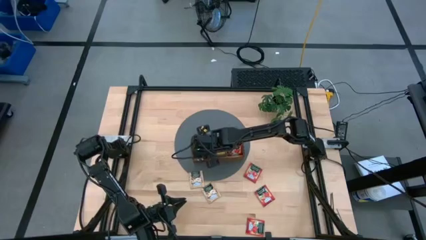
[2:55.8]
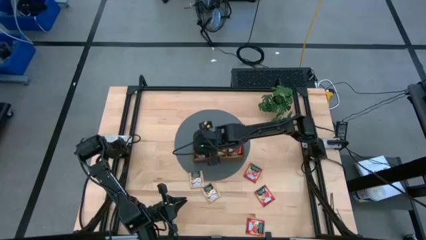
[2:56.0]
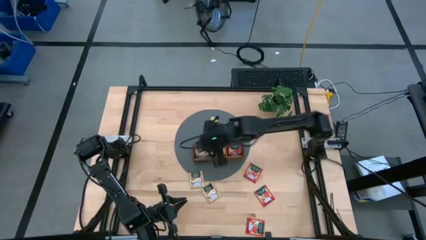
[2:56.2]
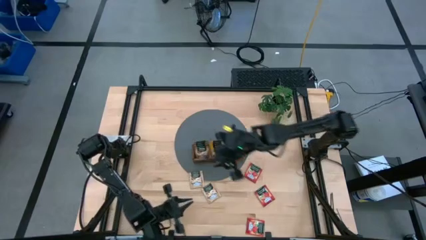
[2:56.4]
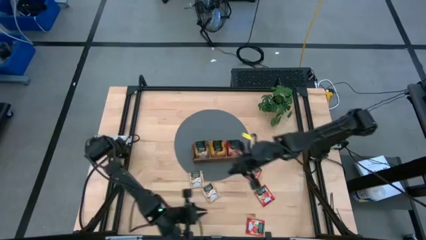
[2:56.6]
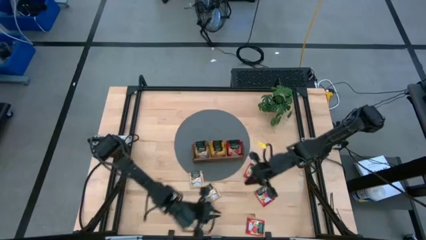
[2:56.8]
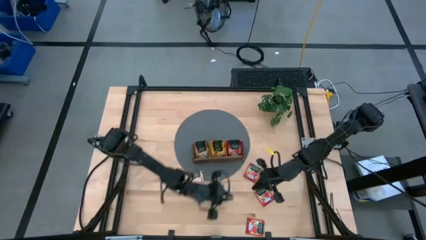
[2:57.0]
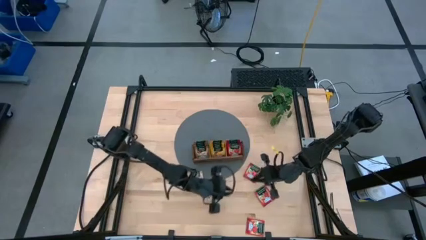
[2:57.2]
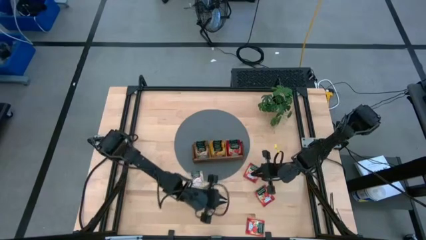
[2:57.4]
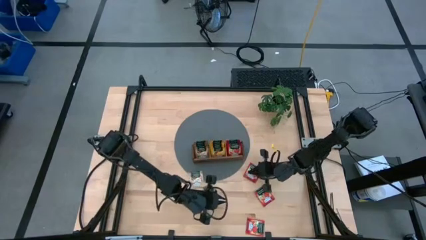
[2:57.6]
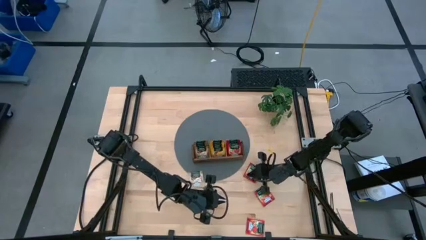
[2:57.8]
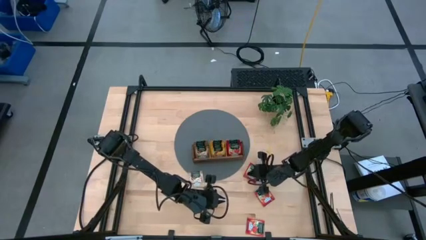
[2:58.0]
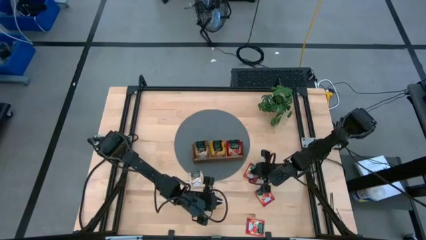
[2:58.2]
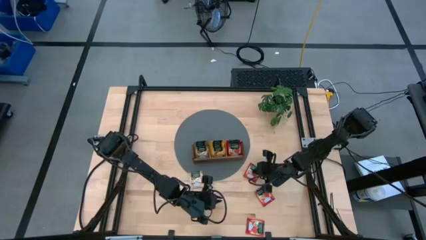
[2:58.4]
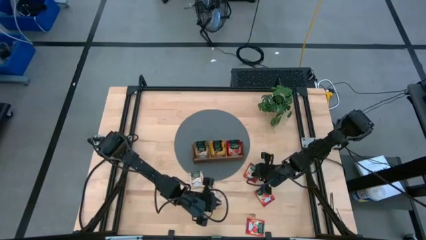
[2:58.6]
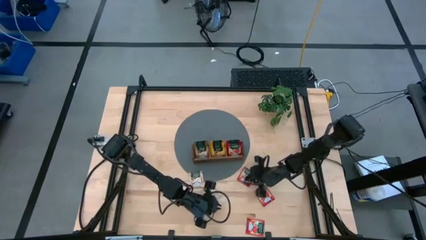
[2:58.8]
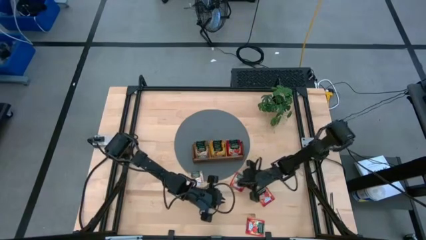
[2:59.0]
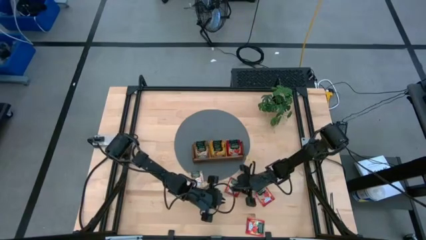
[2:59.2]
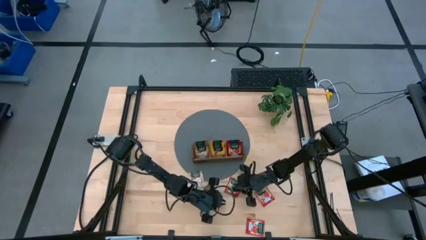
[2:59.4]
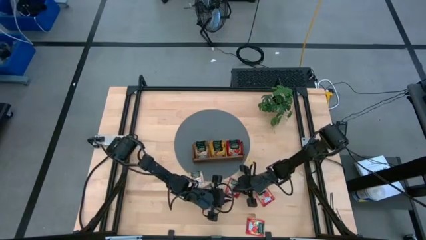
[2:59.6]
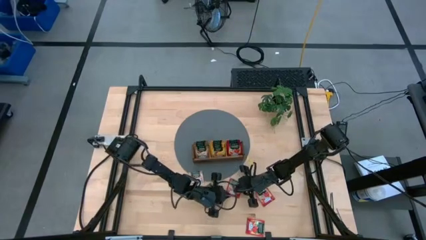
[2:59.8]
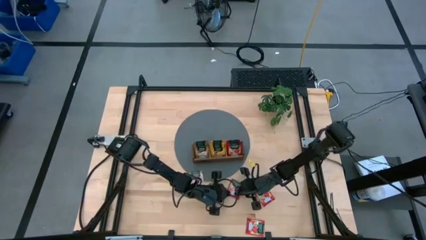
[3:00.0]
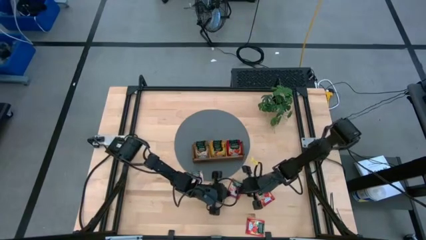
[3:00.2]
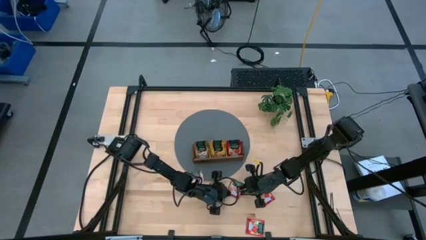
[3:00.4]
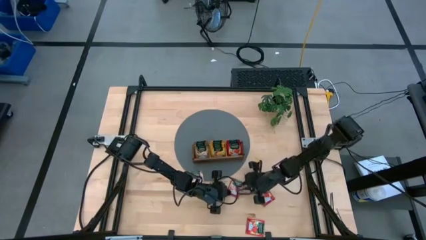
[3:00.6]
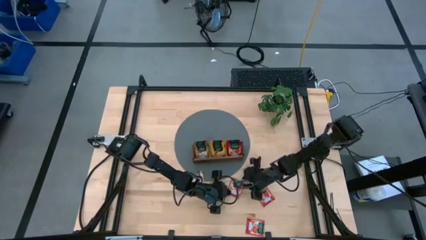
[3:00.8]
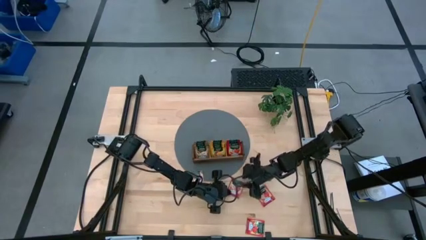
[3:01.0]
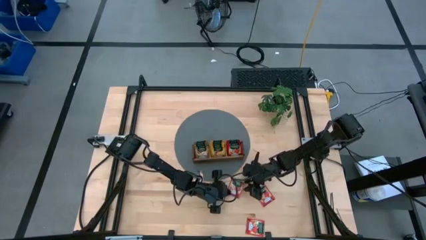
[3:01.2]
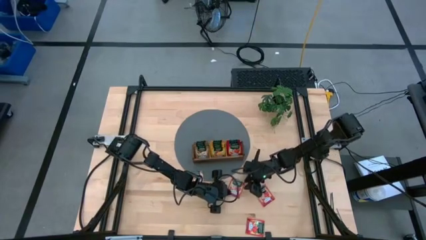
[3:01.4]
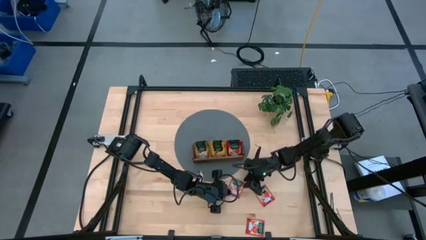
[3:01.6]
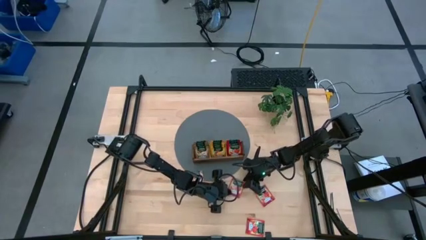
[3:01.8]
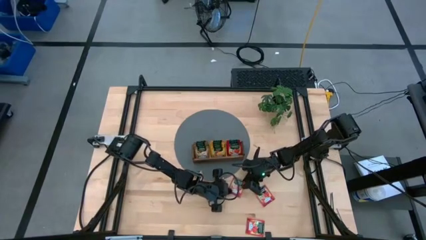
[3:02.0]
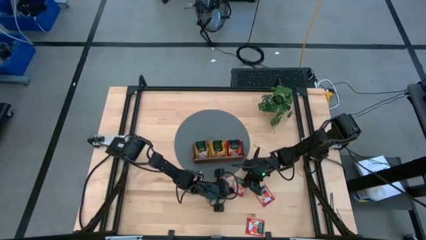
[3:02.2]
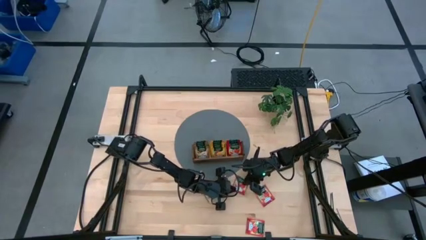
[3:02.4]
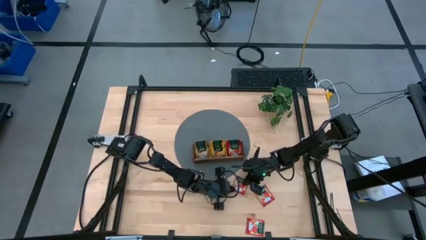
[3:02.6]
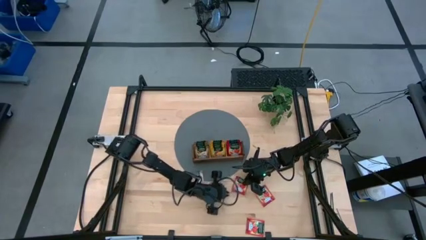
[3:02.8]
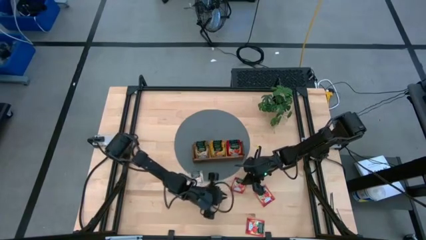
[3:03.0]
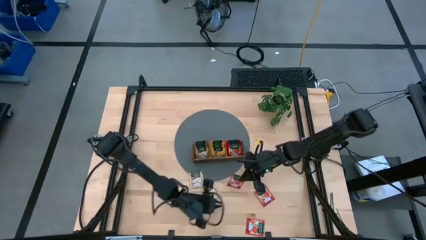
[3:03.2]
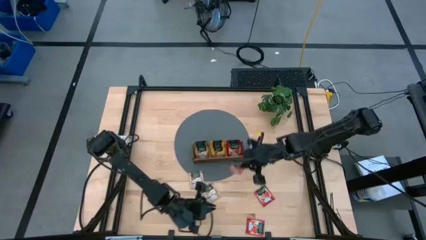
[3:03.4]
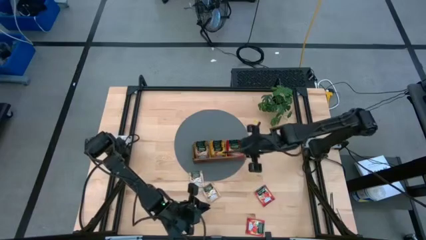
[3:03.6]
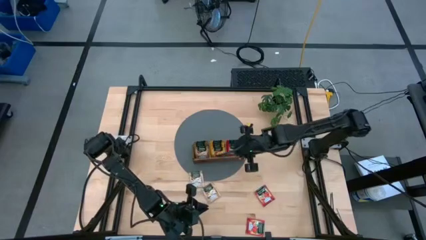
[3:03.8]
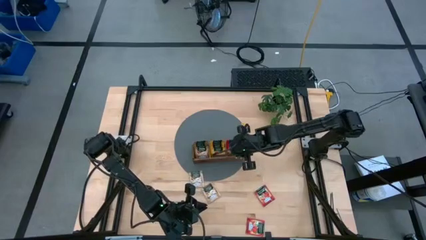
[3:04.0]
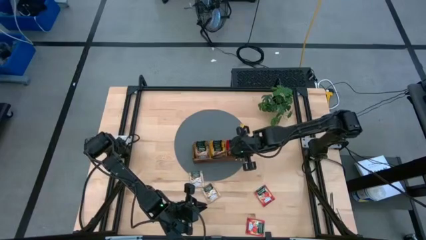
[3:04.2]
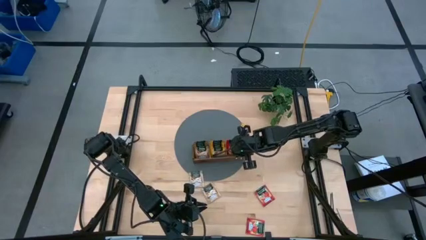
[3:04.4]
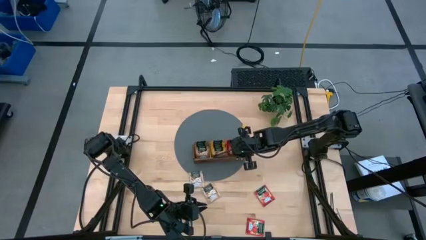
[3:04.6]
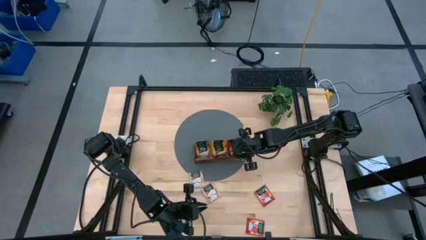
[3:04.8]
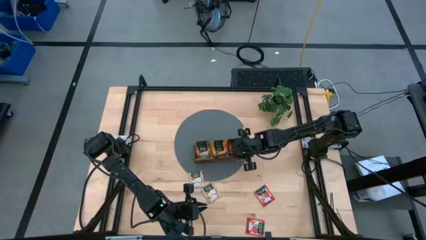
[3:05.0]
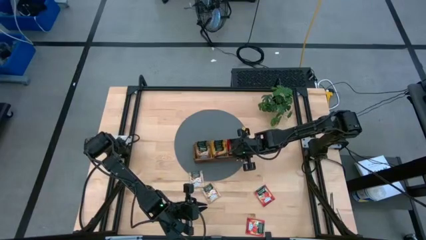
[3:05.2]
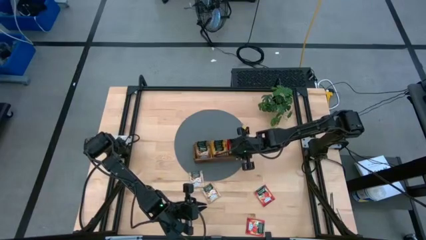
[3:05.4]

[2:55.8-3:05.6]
Task: Pick & Place Tea
Put the top right red tea bag into the right section of the wooden organizer

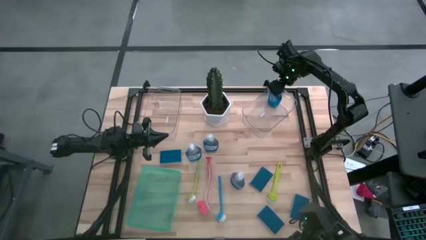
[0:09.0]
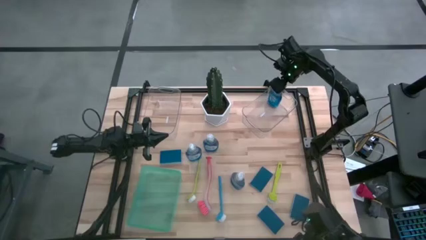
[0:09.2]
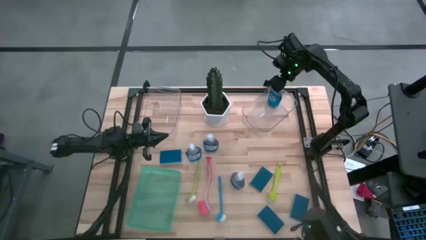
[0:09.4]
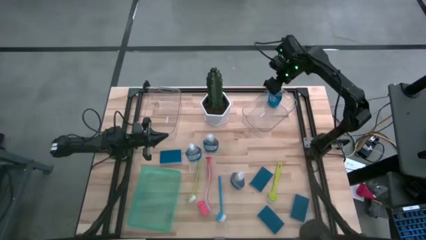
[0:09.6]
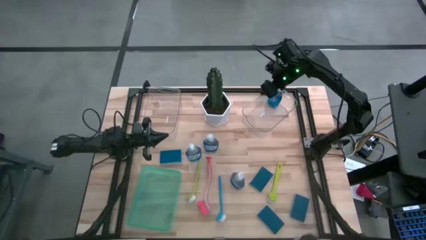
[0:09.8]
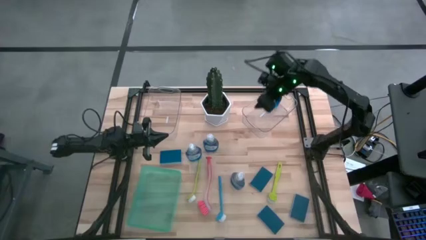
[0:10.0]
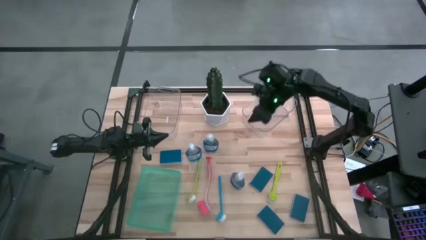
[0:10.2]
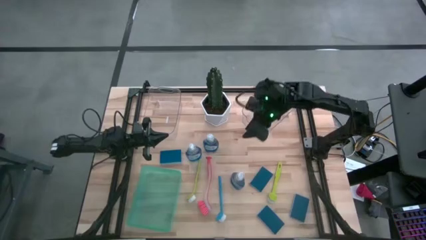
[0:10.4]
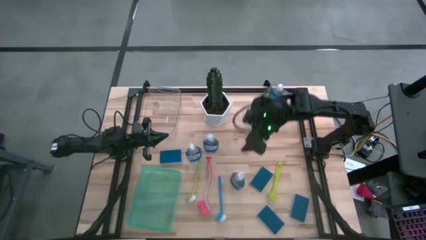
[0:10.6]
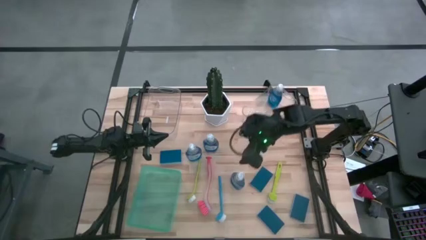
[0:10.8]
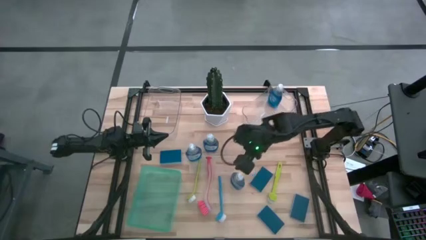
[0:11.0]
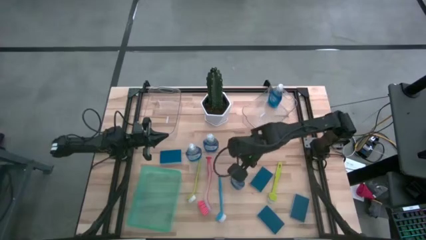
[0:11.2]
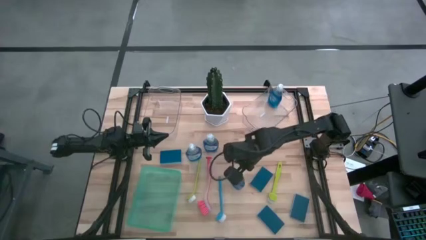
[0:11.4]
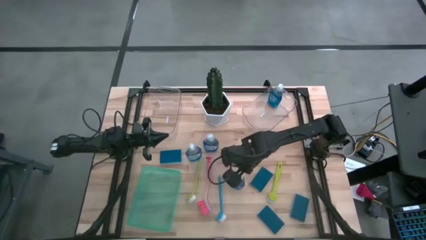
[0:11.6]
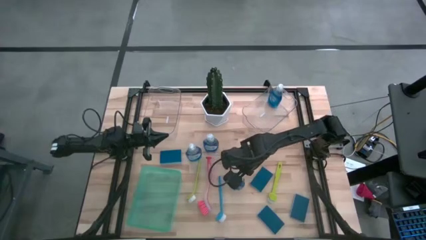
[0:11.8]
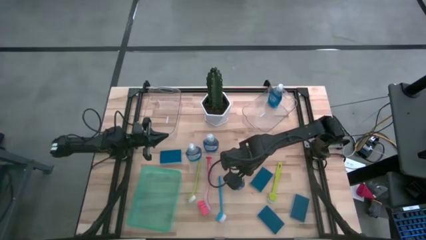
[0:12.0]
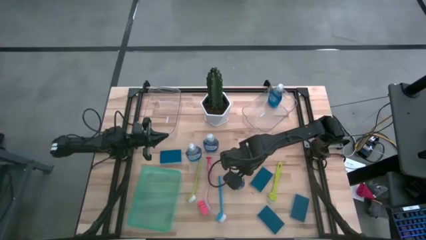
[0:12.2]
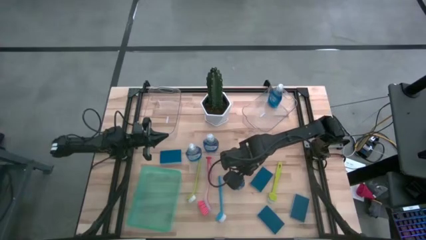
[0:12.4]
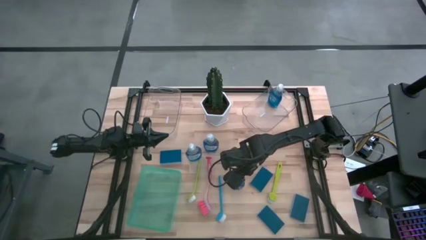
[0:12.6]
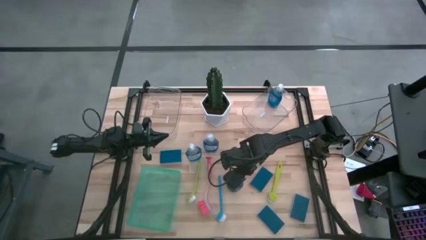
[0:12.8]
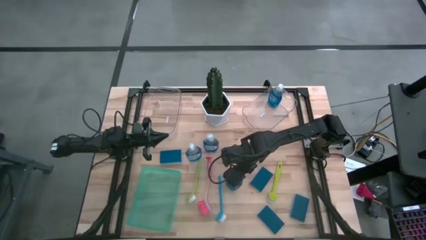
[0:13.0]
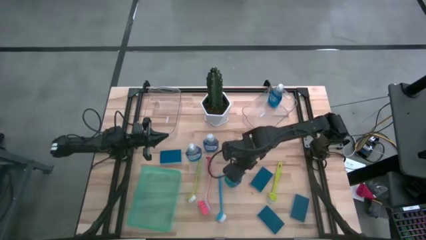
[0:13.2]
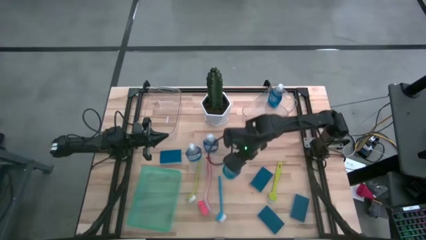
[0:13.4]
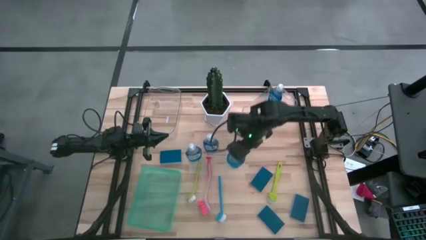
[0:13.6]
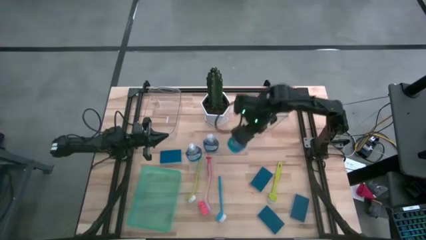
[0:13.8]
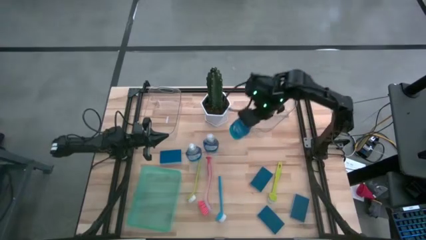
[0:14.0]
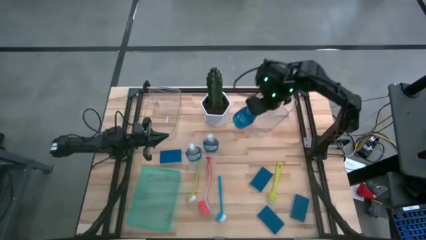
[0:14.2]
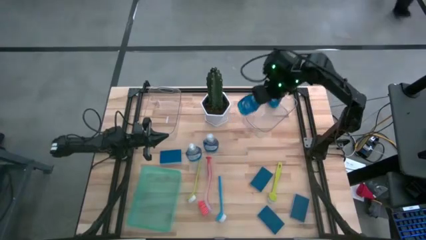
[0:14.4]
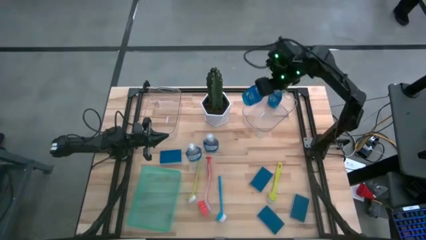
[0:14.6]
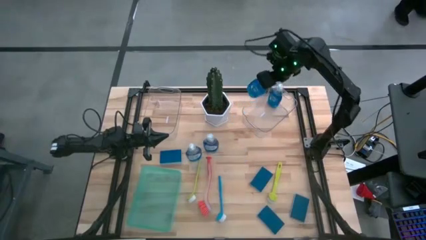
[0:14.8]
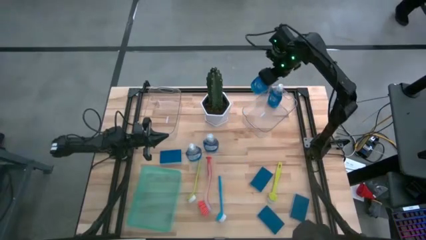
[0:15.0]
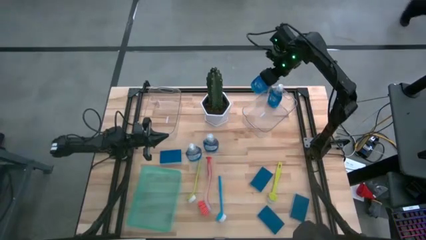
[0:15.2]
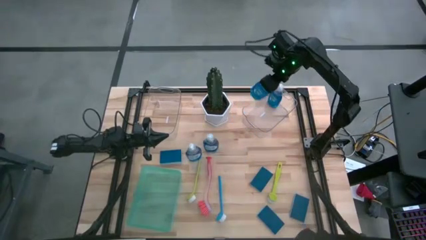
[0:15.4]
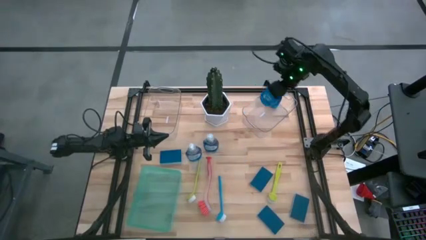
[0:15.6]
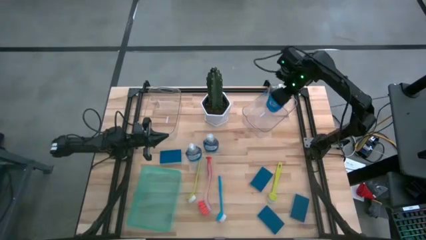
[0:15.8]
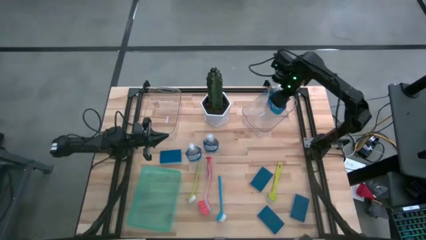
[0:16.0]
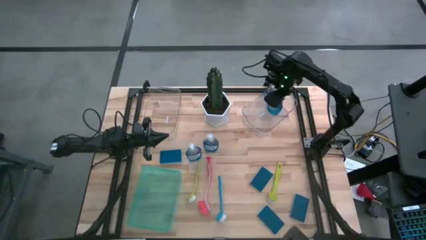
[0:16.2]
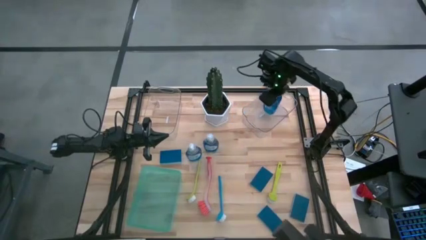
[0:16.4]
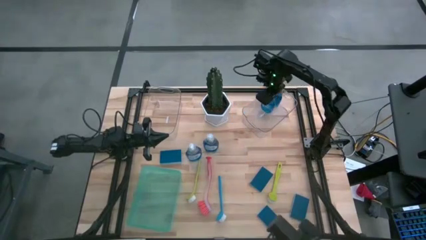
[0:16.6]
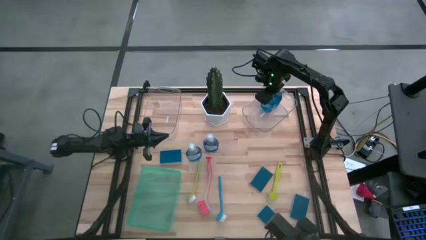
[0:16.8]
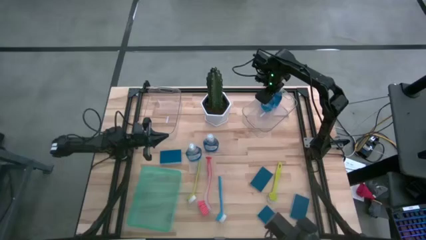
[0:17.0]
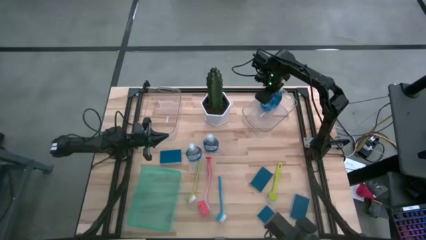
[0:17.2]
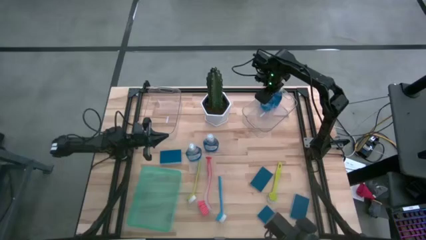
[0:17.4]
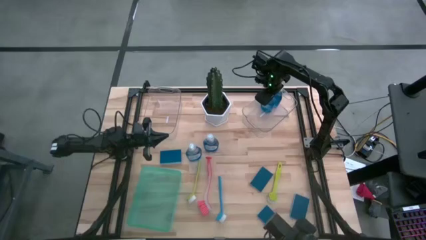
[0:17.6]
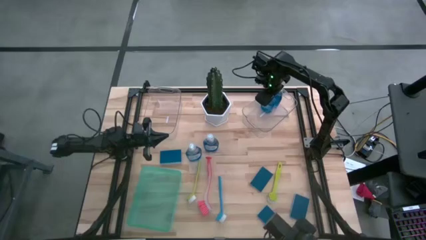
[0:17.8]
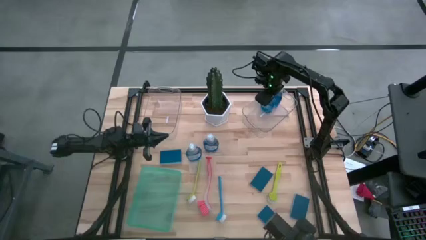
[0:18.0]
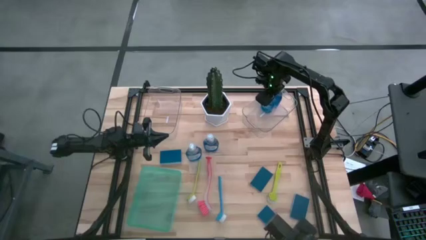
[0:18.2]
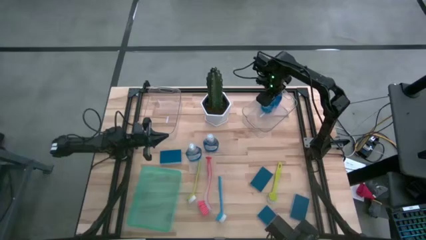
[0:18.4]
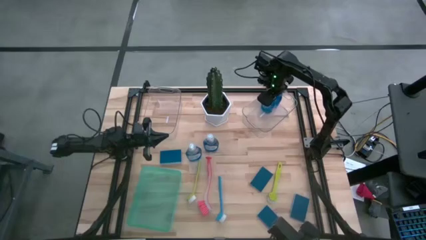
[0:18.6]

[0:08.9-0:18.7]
Task: Pick & Place Kitchen Sink Supplies
Put the dishwashing liquid bottle into the right transparent bin
